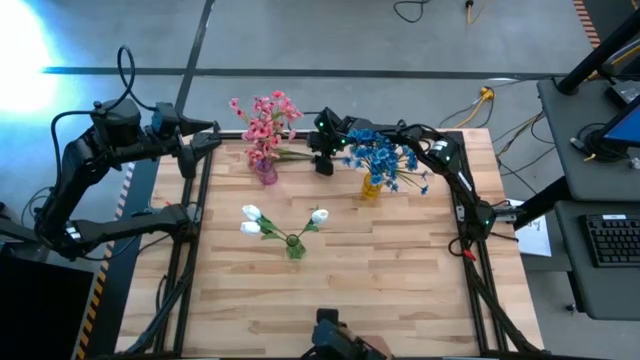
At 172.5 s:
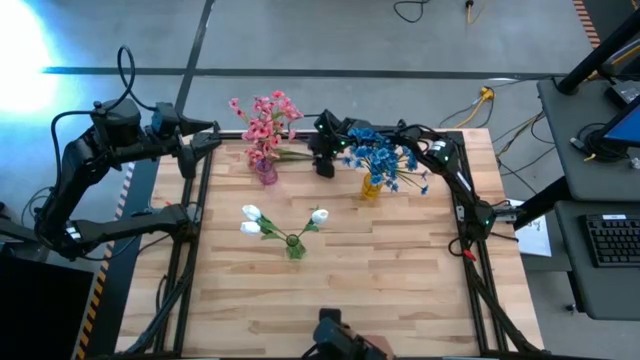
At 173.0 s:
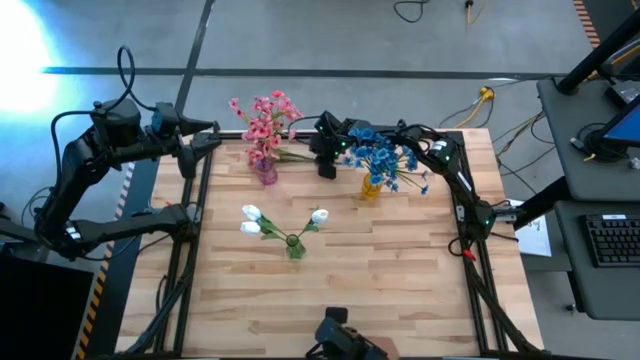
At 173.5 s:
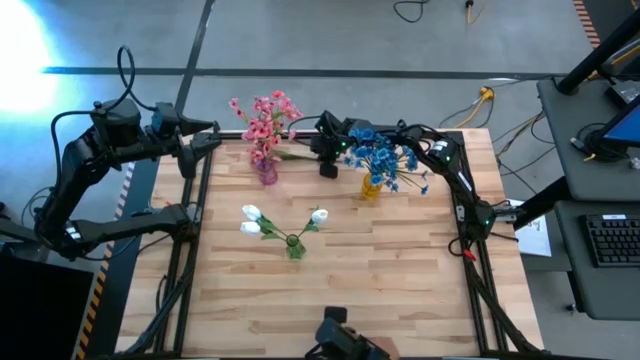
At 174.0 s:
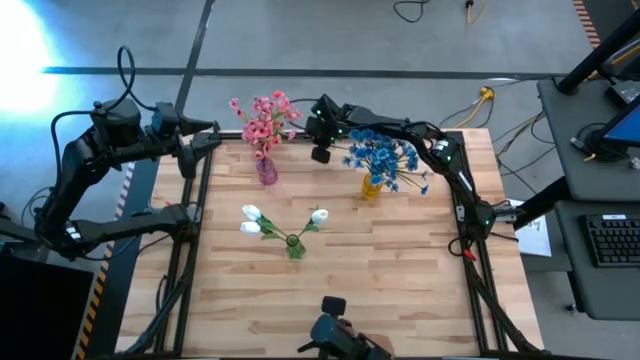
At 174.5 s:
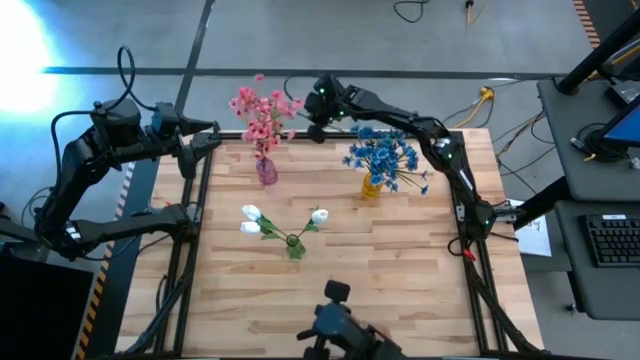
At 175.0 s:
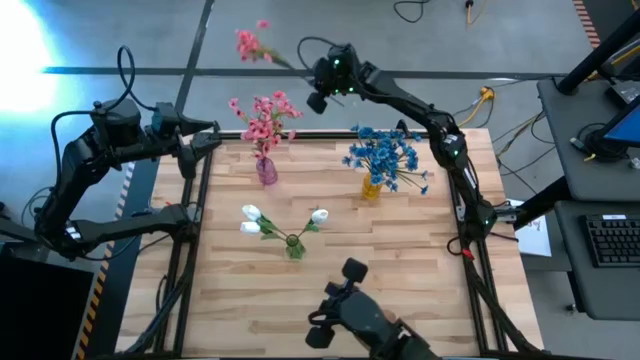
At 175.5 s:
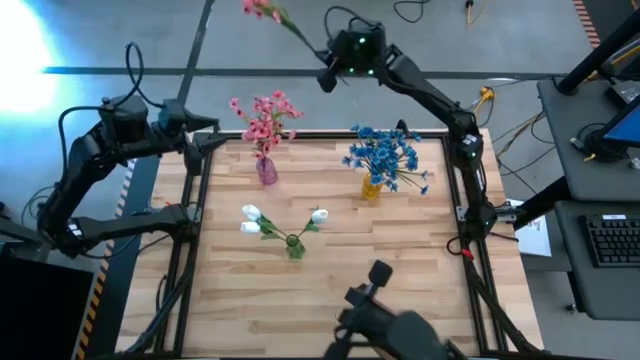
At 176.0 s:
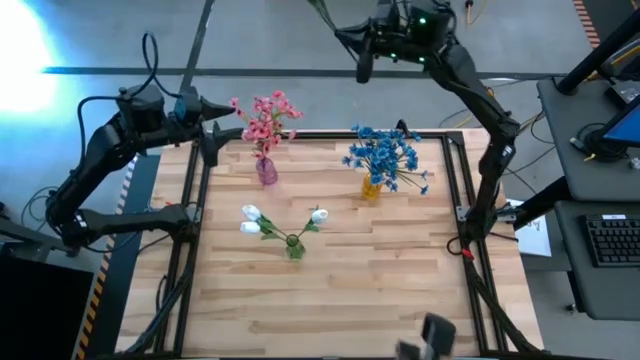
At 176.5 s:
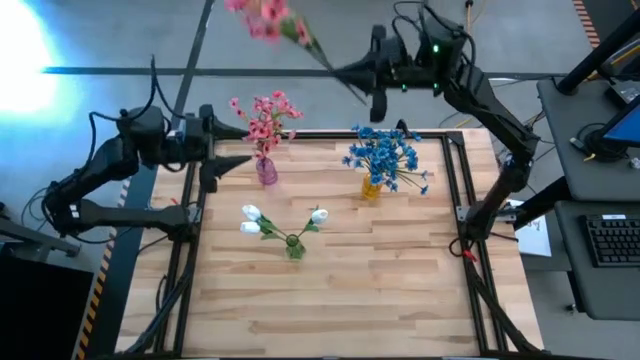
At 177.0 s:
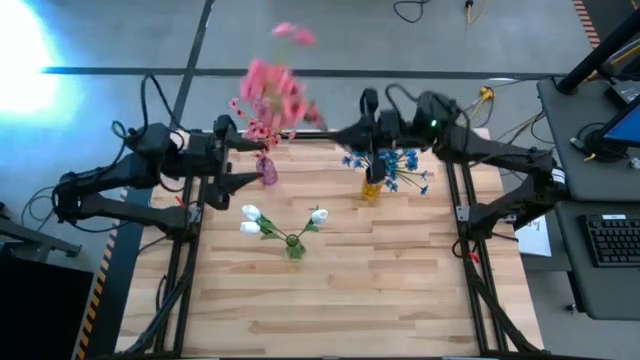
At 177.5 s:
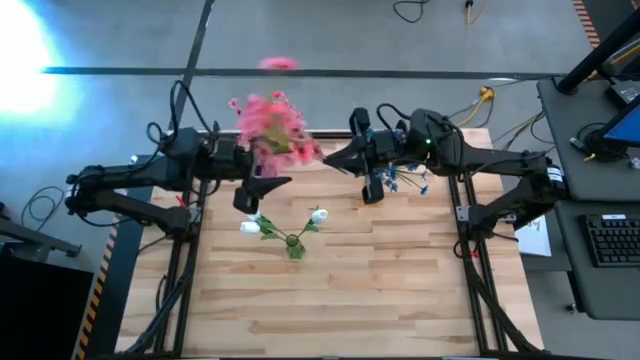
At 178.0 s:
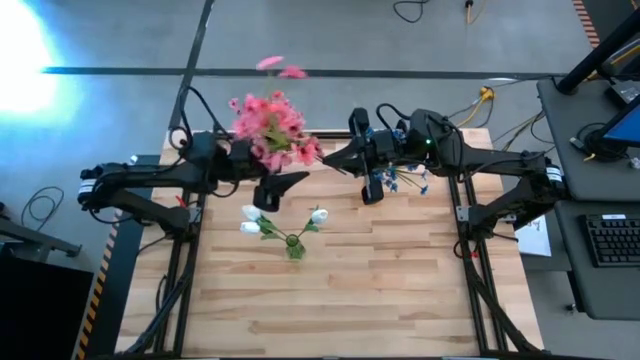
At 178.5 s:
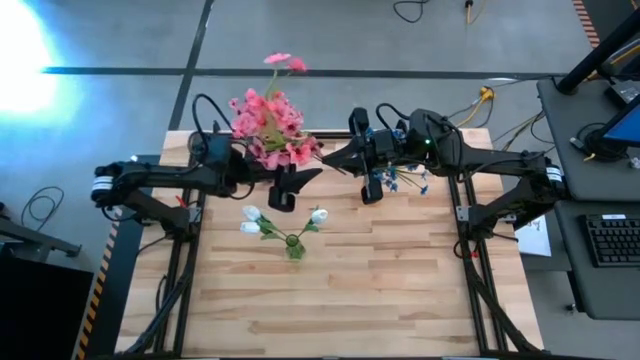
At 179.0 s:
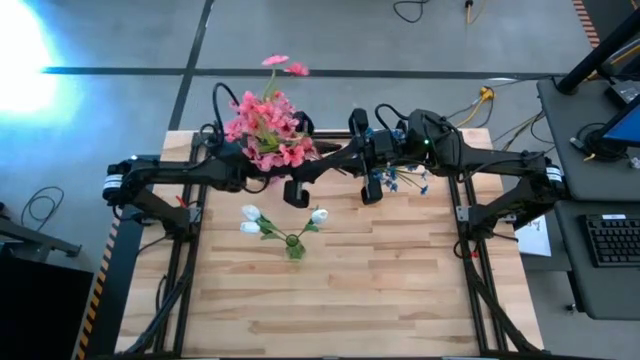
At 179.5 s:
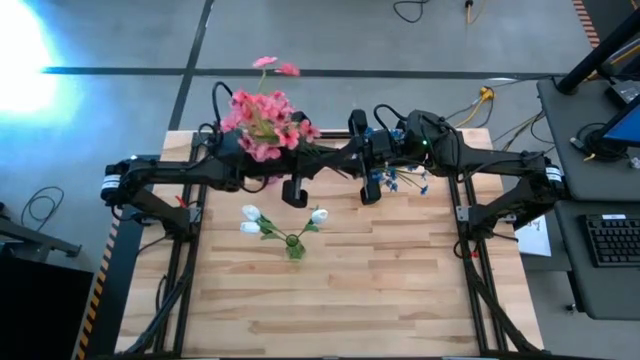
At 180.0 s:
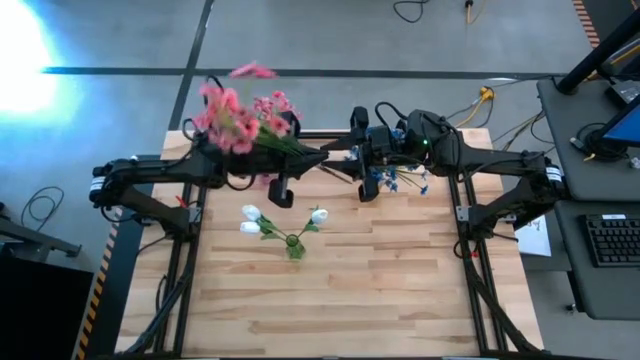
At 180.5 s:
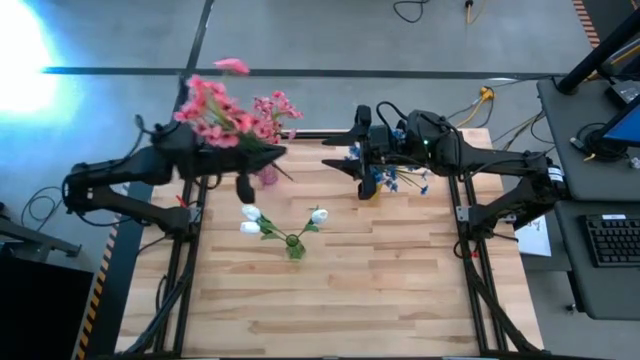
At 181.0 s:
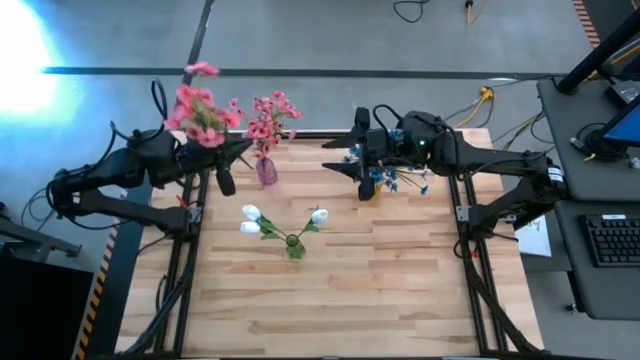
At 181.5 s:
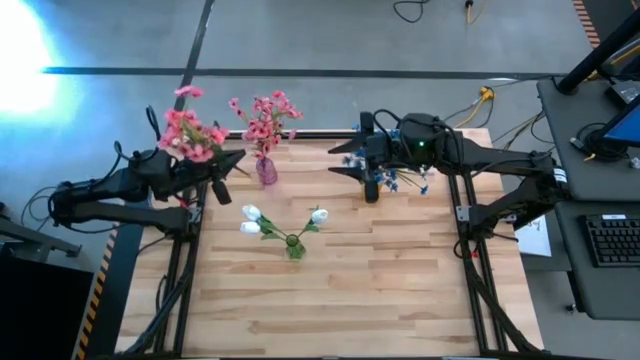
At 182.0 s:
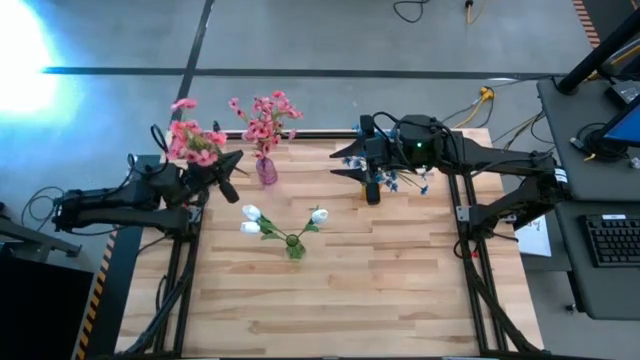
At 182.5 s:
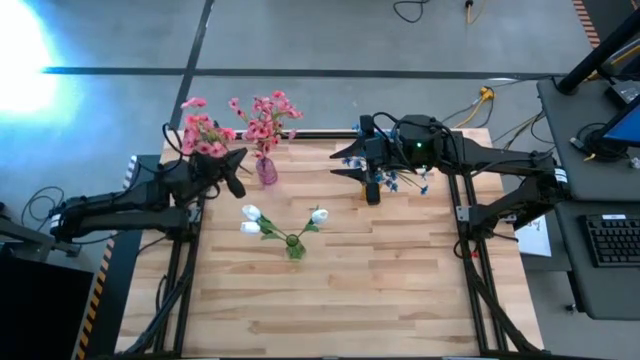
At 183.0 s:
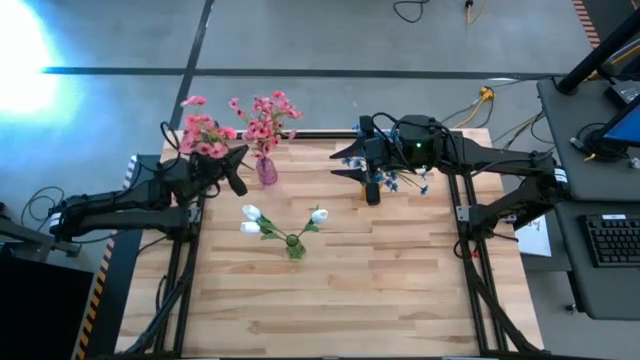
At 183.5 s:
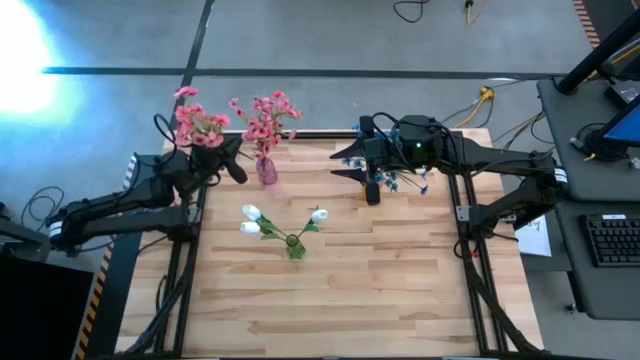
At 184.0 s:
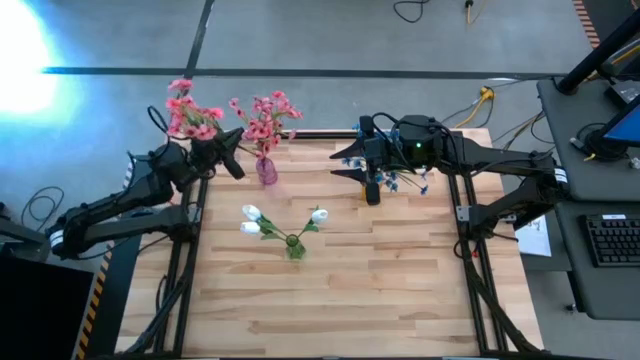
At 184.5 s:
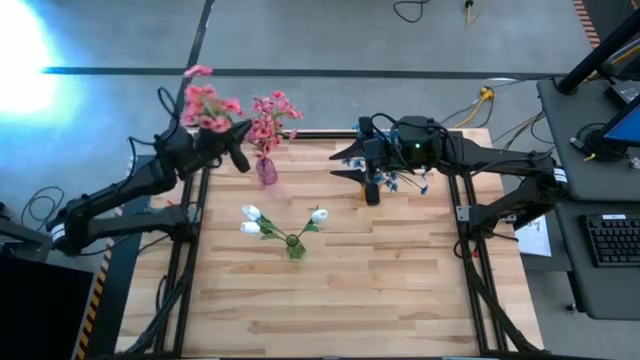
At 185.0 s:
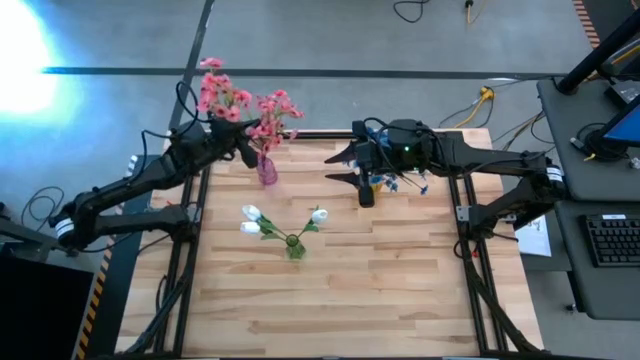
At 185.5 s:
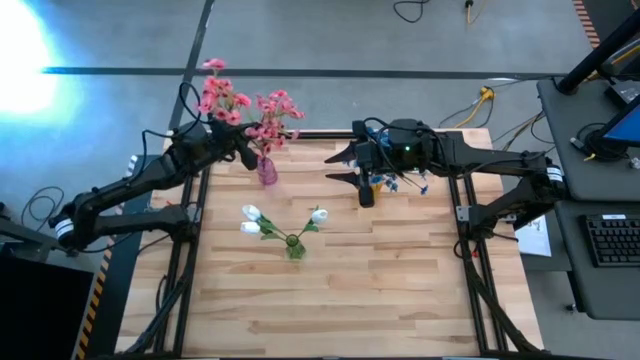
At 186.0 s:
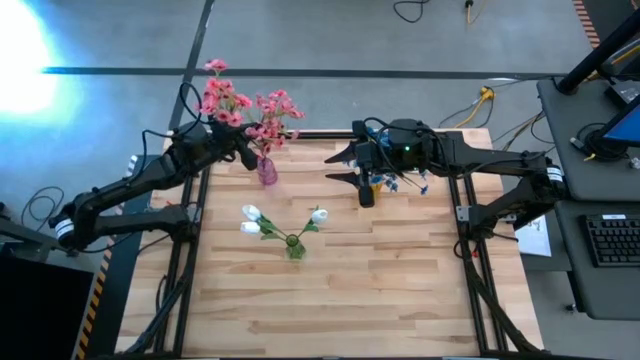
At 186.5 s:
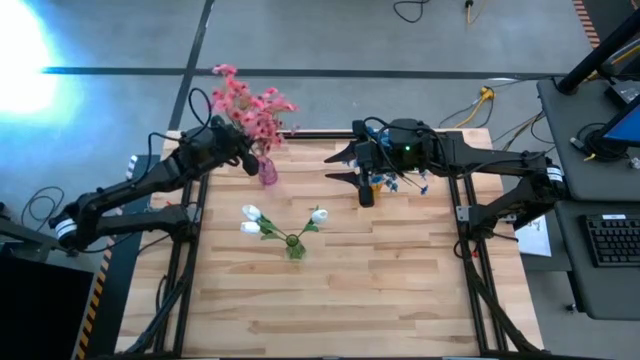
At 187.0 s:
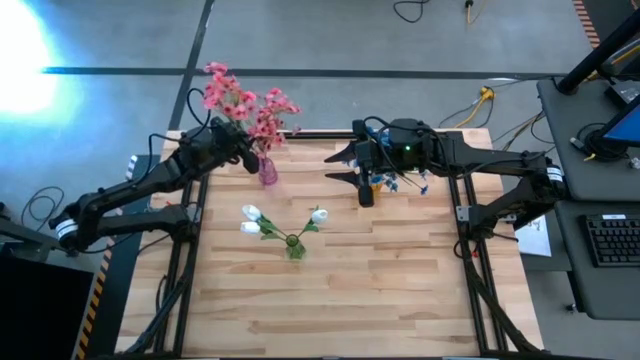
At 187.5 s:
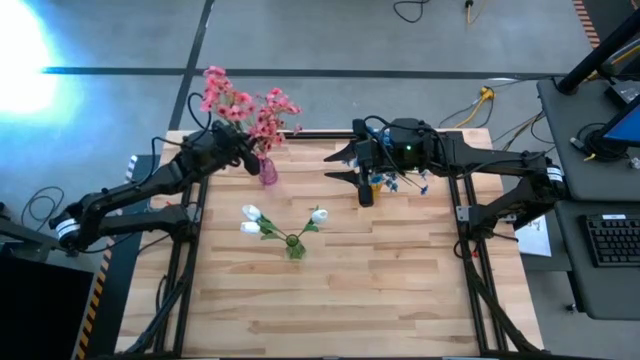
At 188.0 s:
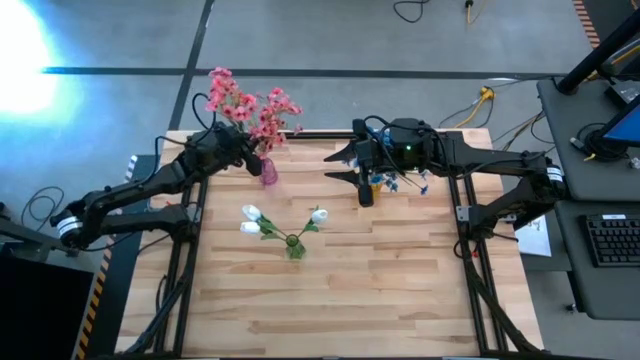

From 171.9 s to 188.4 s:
Task: Sort flowers into vase by color
Put the pink flowers into the pink vase

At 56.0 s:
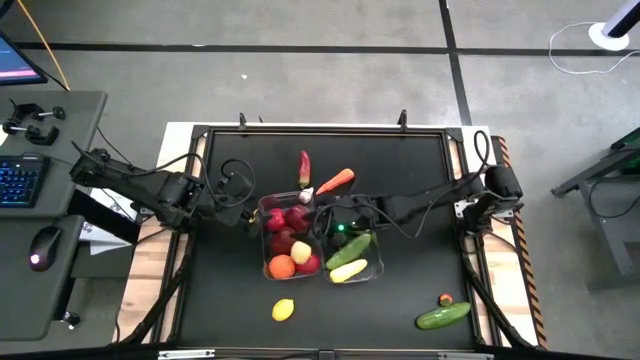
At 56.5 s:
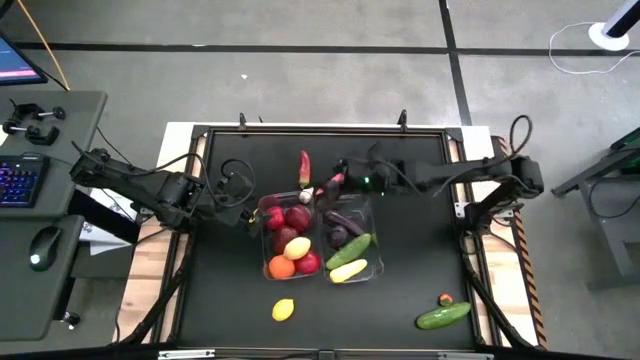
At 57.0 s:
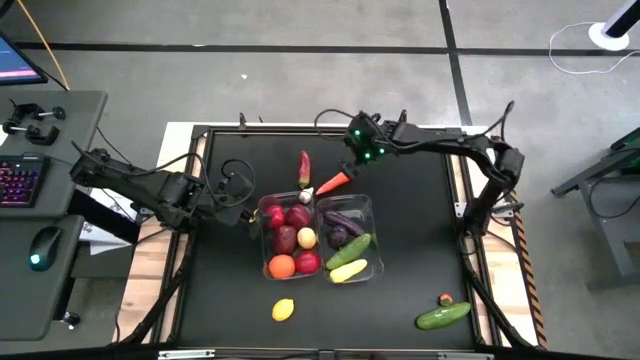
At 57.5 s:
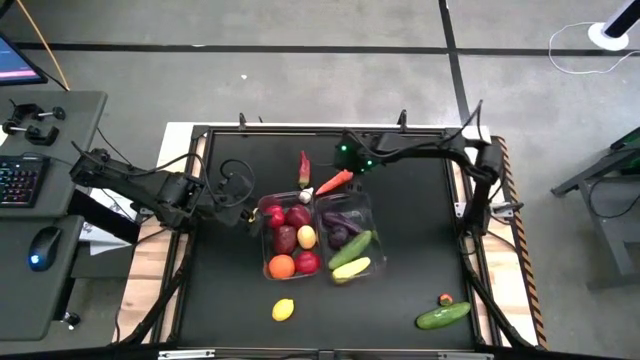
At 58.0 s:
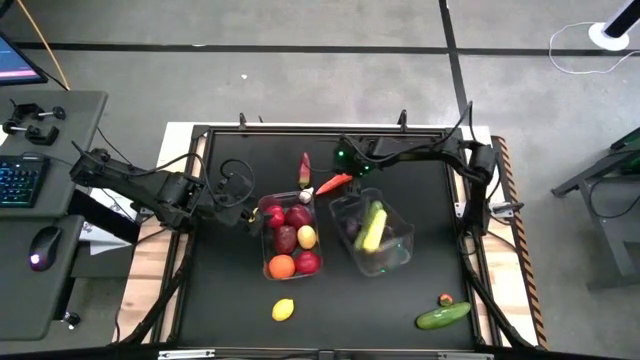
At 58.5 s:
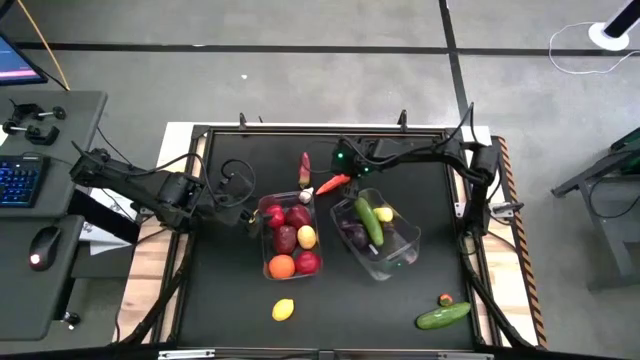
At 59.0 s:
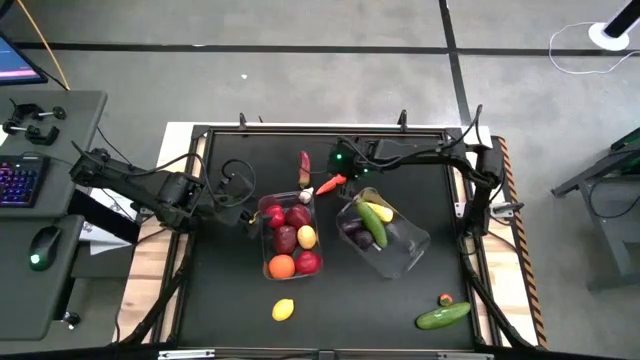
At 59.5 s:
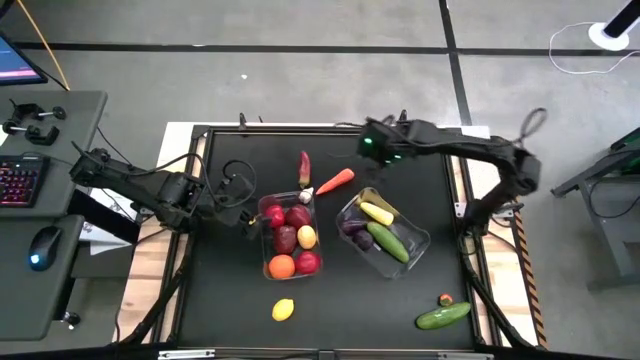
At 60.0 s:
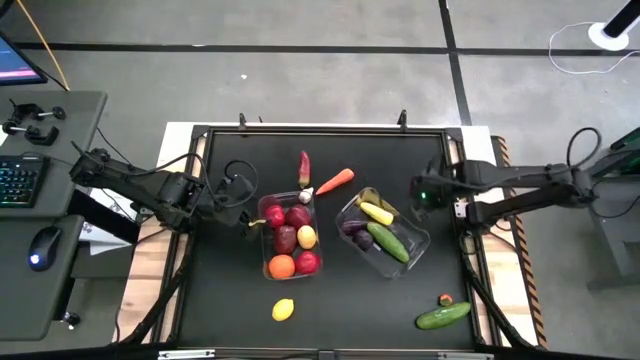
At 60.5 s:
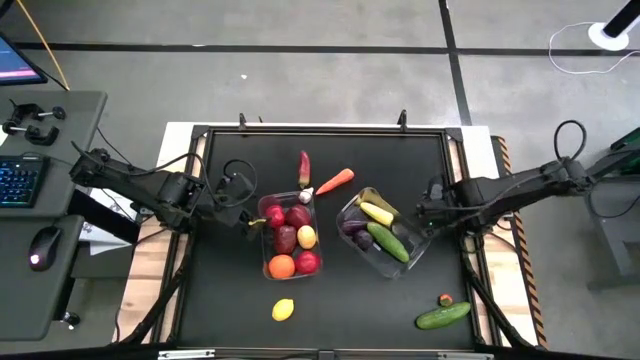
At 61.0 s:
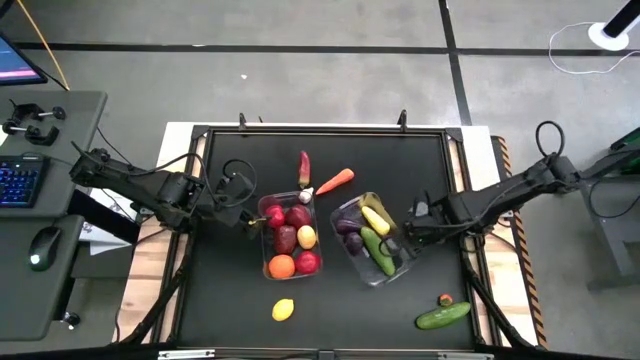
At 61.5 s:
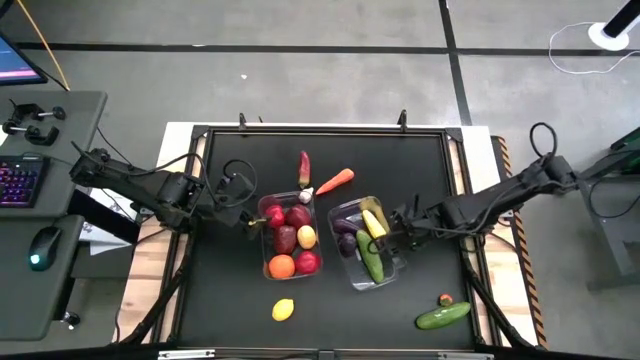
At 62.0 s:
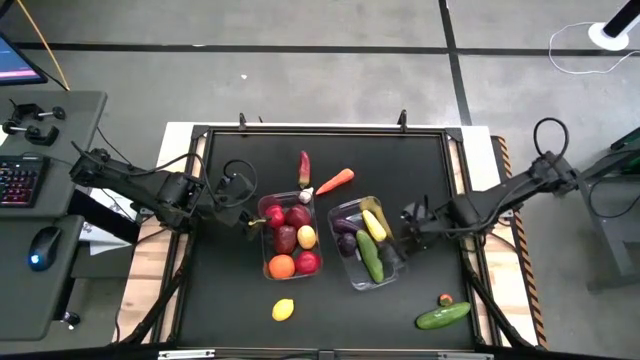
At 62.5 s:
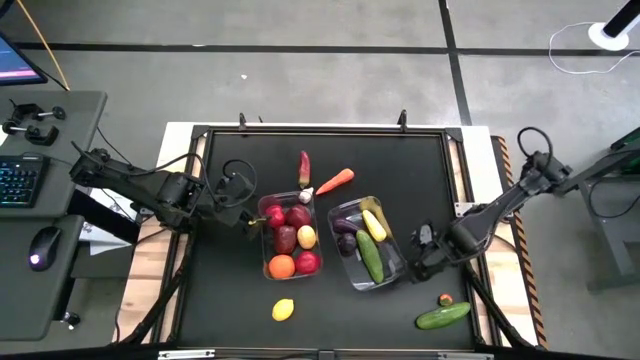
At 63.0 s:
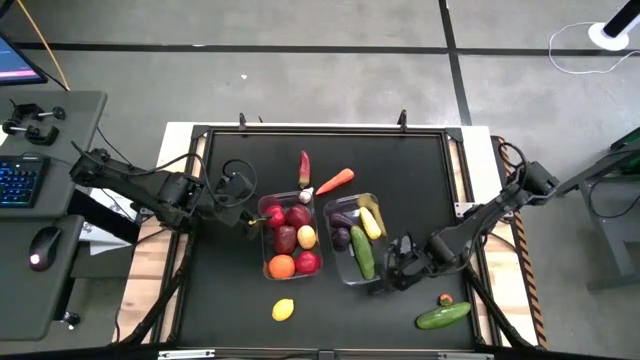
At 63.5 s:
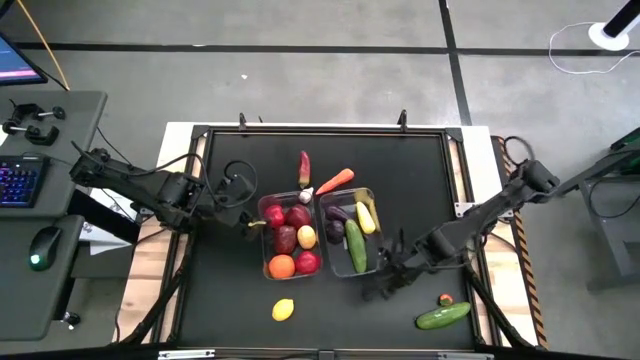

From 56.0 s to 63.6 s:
Task: Sort produce into baskets
Adjust the right transparent bin
